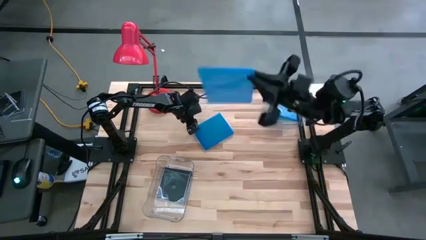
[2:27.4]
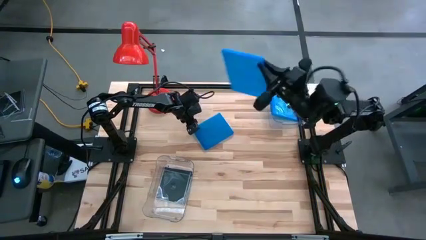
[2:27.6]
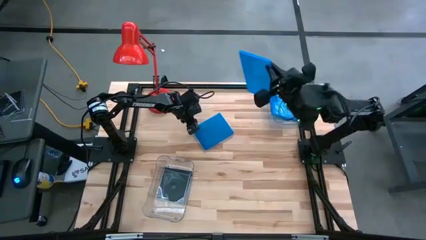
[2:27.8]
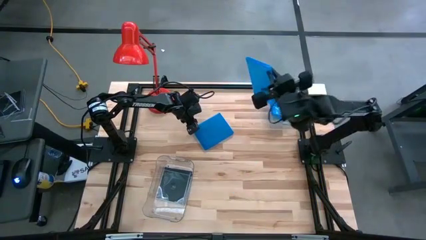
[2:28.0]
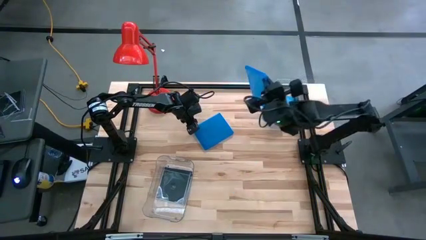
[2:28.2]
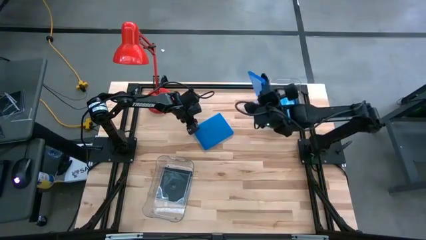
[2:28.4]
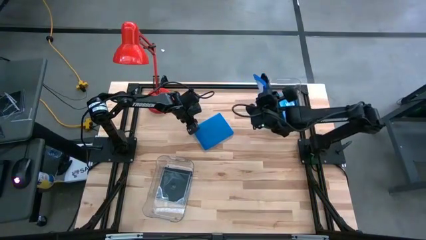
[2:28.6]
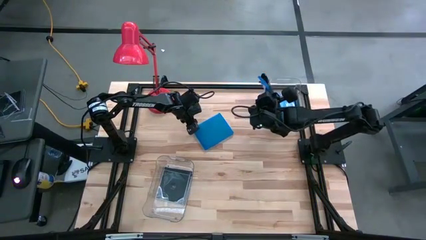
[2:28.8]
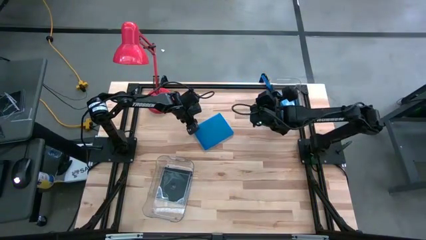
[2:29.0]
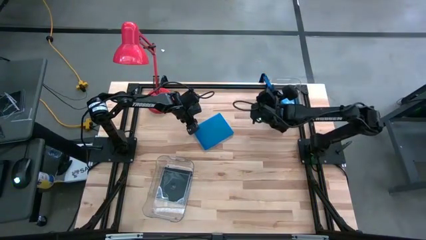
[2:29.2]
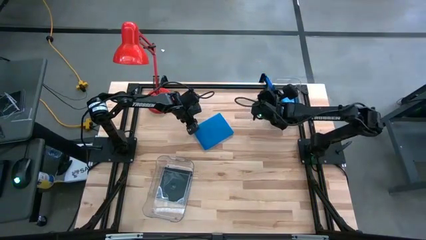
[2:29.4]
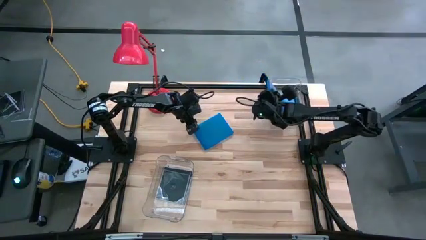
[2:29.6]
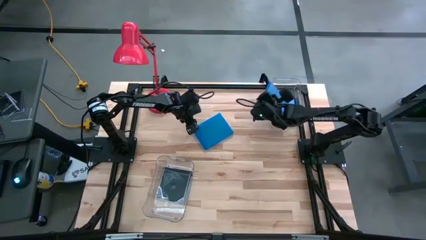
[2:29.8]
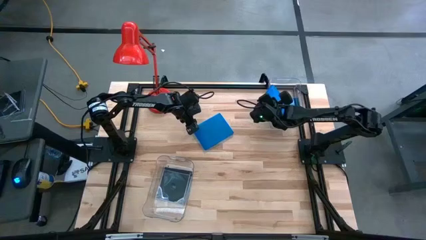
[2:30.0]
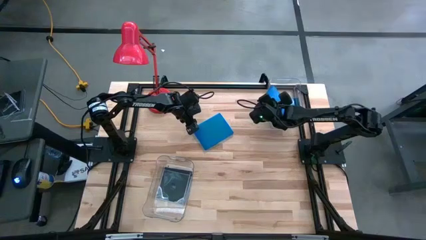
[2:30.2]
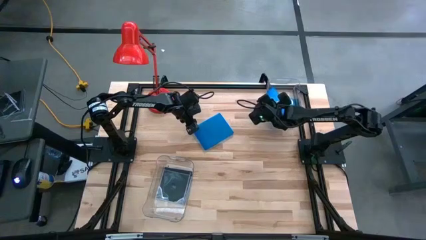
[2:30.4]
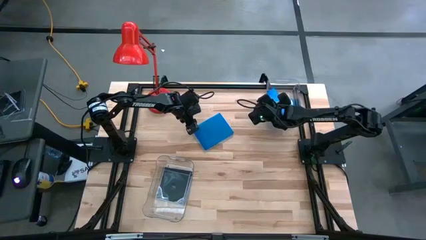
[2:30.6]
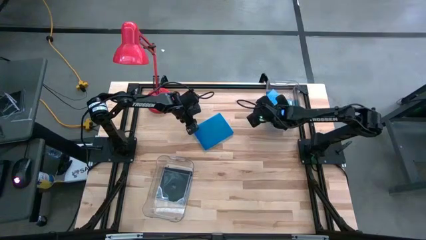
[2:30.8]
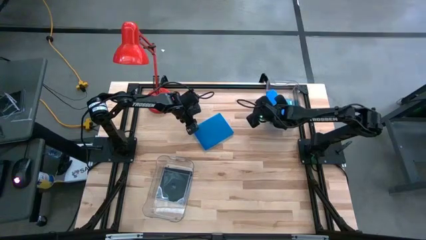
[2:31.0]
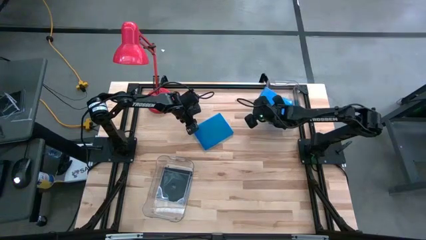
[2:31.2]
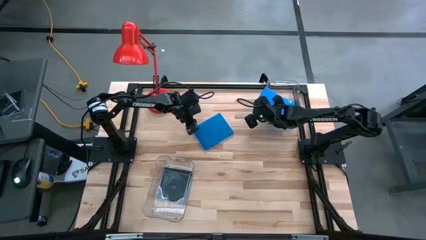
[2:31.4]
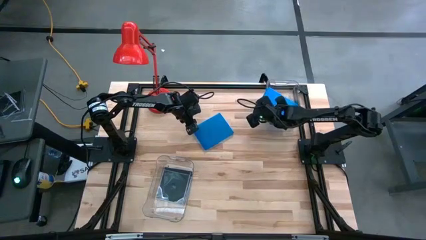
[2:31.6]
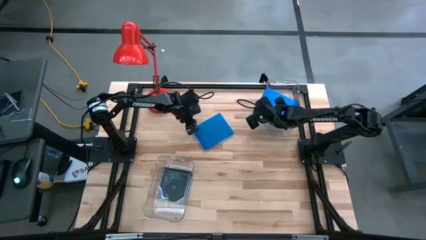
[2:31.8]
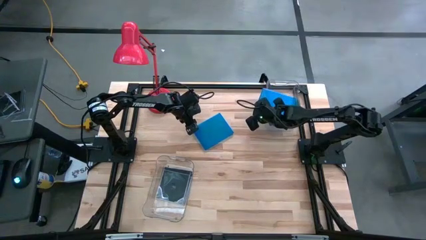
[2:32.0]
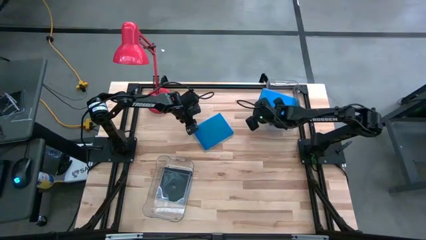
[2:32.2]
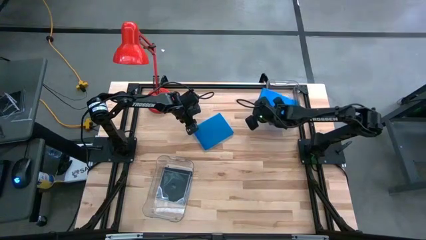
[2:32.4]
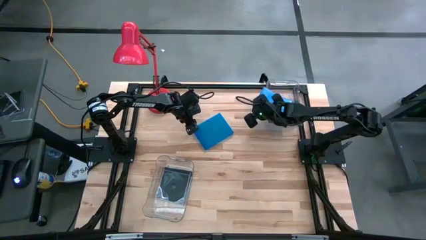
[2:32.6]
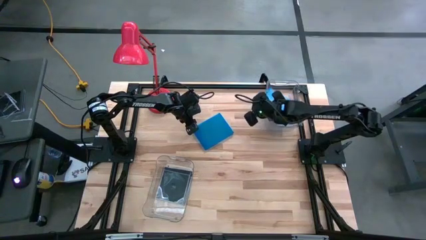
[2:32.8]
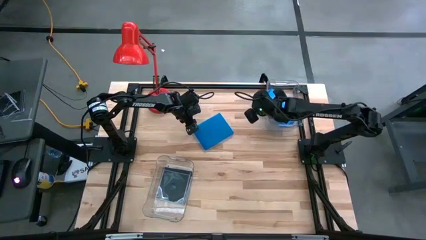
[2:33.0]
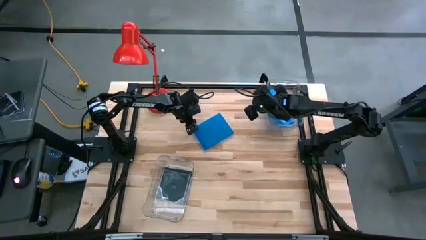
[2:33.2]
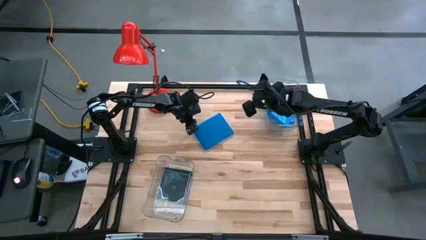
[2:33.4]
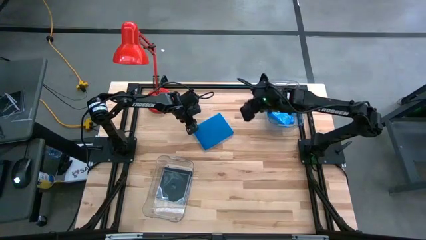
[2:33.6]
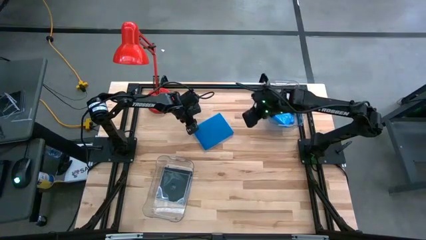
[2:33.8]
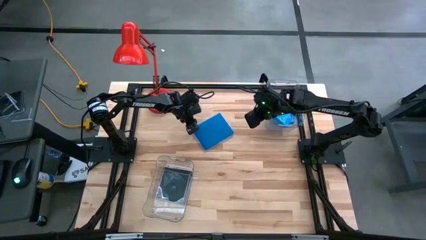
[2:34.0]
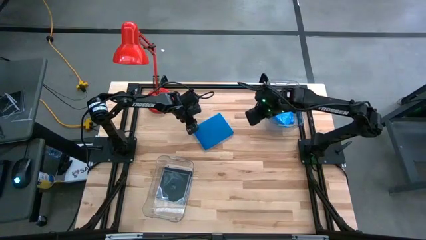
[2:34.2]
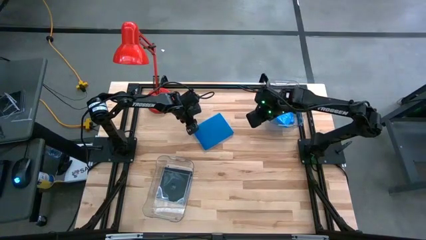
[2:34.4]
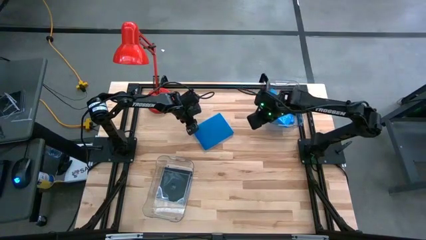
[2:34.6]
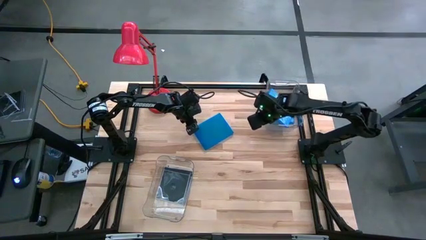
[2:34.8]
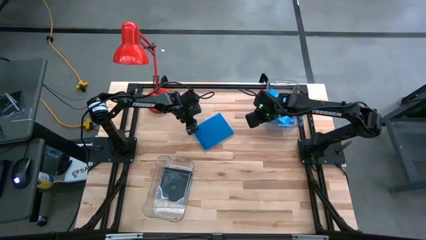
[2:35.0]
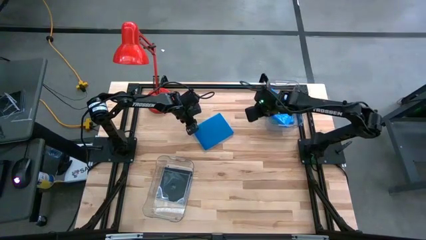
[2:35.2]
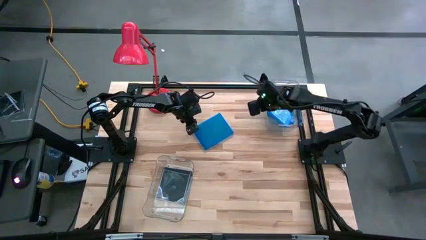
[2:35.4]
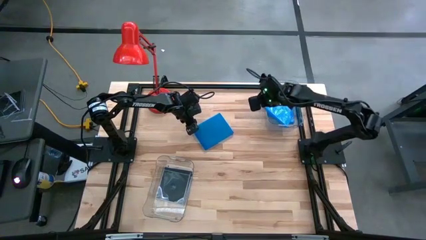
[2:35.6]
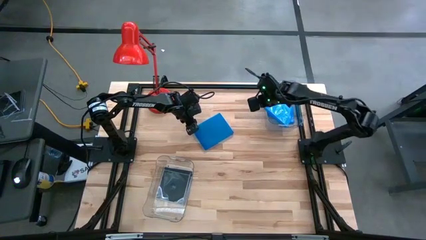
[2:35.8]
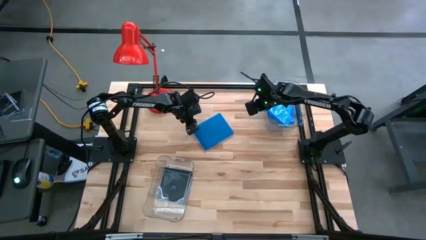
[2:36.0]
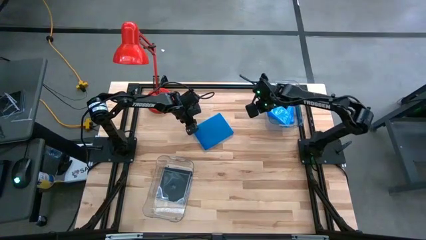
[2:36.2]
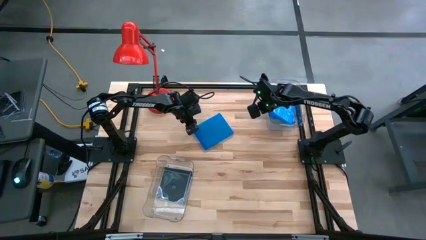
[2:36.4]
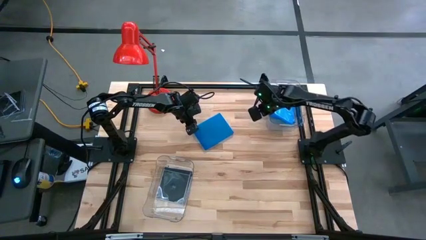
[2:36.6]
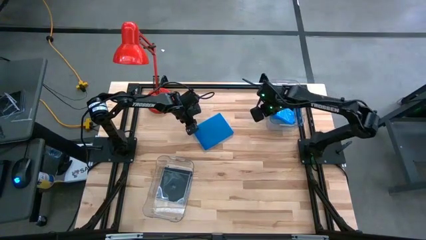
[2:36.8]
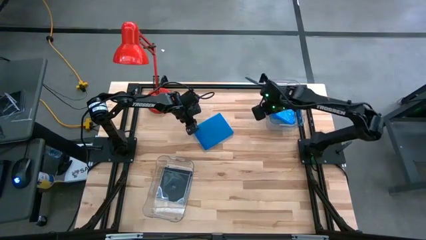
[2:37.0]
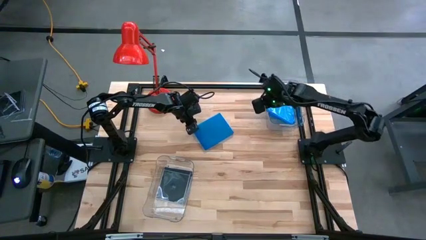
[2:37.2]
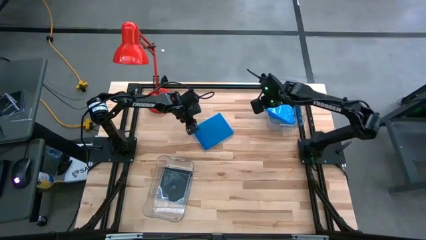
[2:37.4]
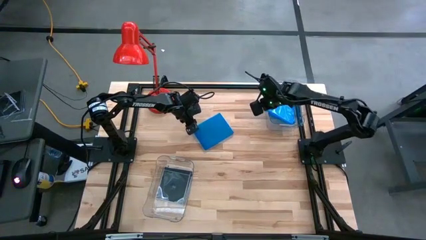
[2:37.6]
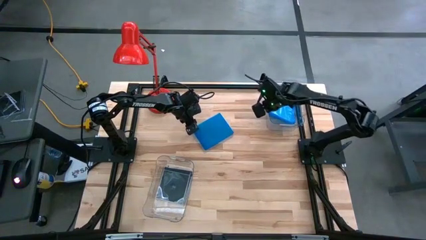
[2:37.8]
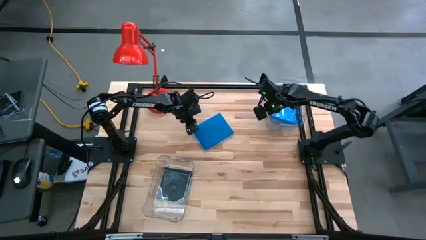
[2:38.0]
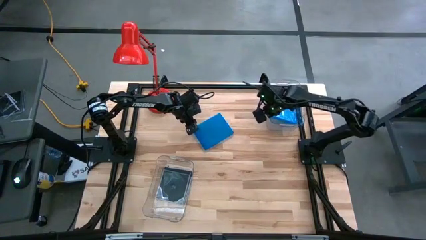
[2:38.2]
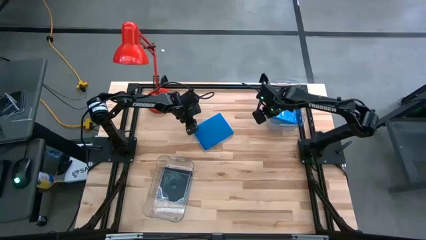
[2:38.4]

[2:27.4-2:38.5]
Task: Pick & place jewel cases by type
Put the blue cd case into the top transparent bin

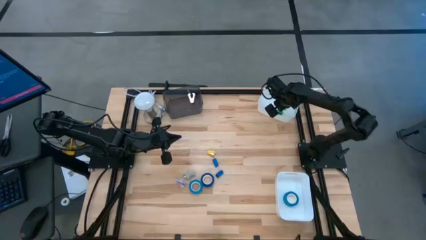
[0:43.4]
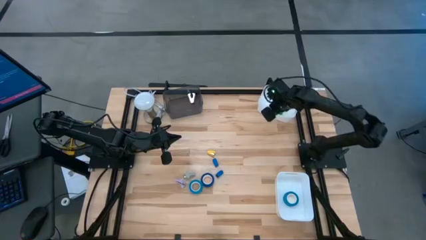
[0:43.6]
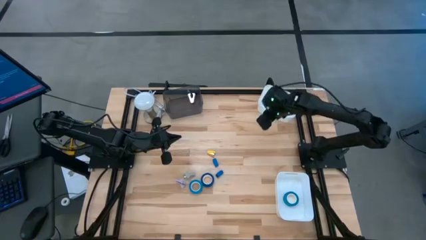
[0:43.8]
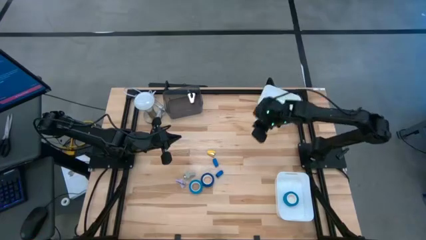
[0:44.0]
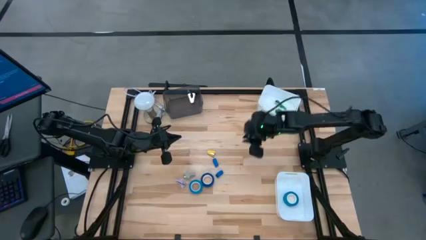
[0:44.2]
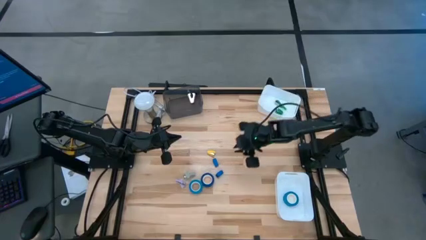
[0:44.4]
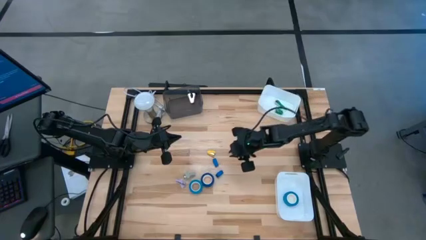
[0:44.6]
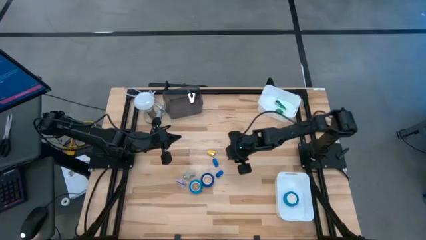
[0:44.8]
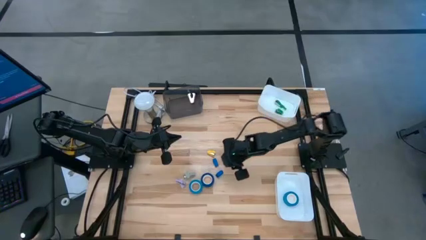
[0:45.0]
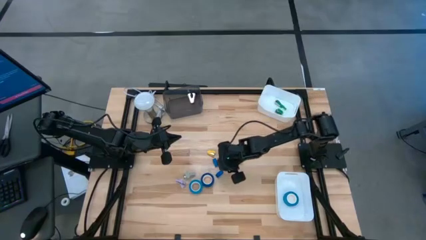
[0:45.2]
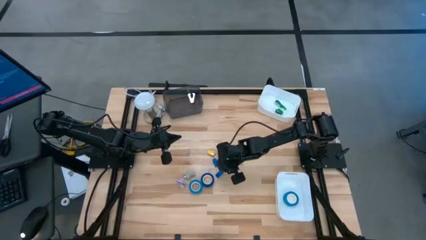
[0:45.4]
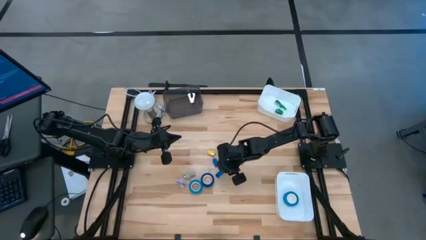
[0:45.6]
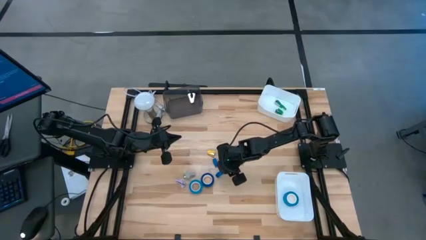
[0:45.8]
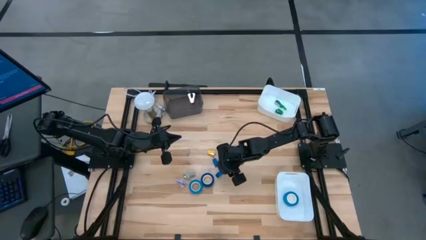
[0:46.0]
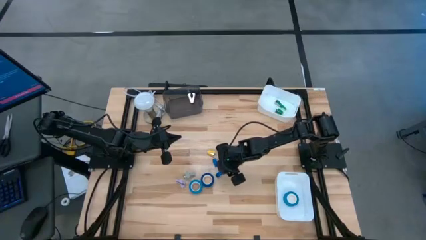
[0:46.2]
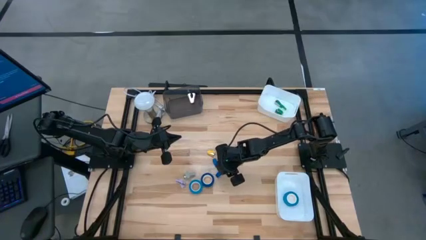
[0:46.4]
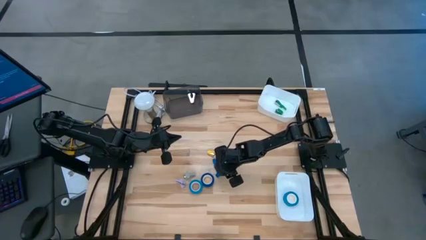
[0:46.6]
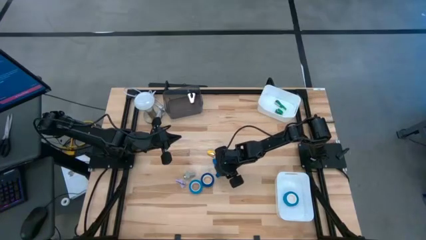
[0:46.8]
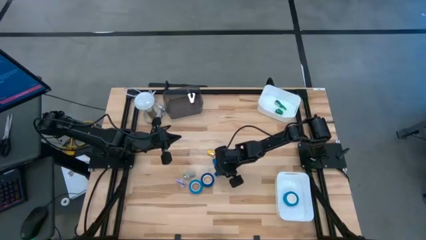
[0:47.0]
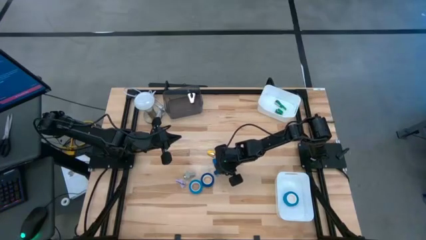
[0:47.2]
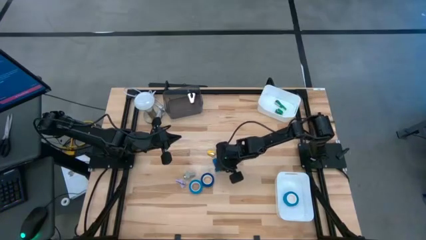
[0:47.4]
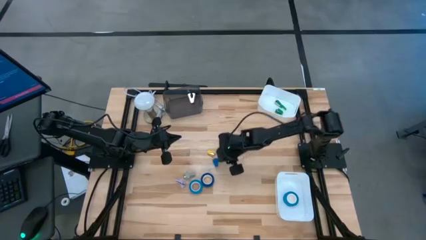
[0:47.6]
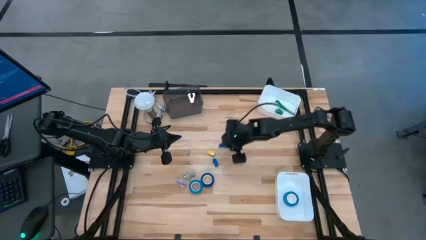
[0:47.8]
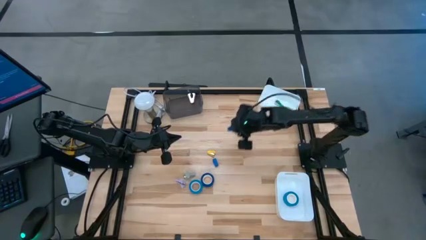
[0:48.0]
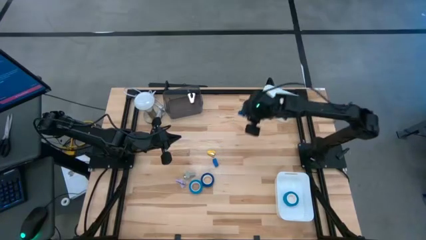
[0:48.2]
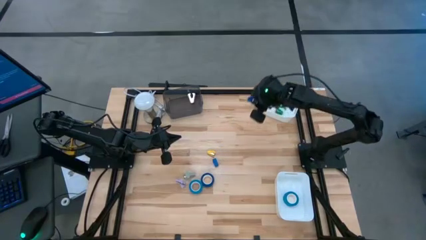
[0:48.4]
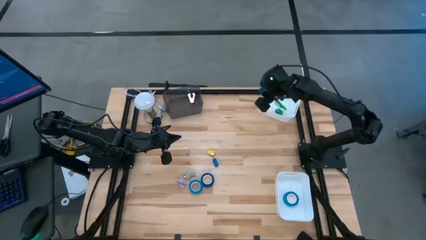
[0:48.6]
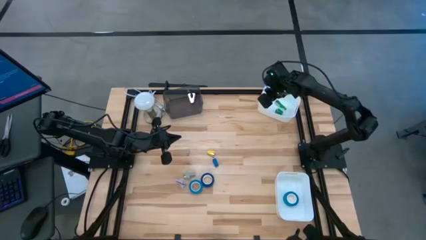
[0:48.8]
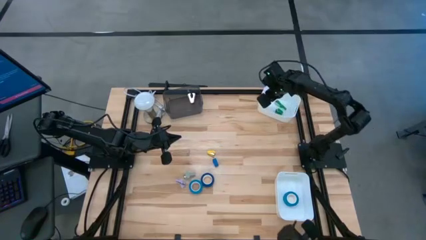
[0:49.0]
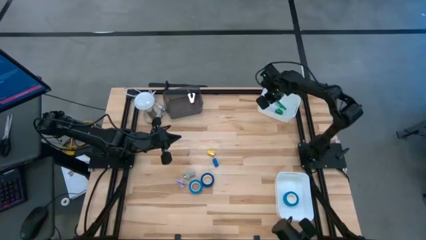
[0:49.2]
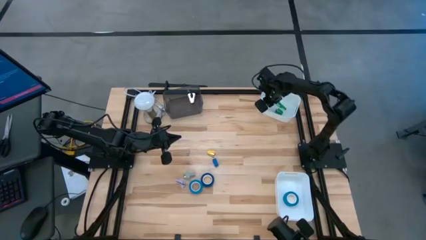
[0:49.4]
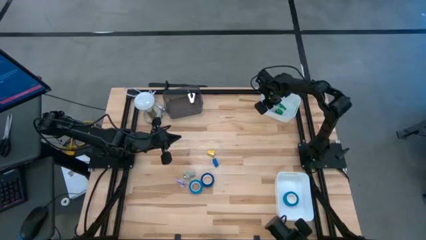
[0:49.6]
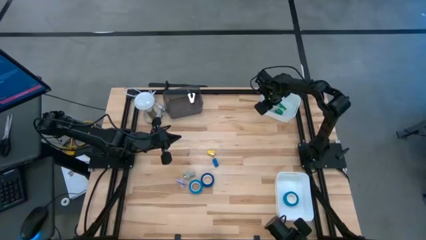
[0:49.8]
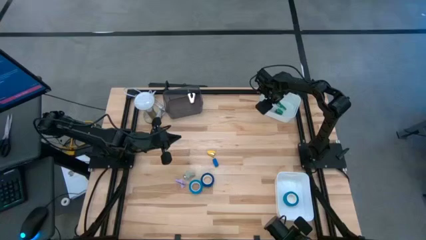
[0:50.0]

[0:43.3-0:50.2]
Task: Pick and place Stapler, Stapler remover, tape
Put the bottom blue stapler into the top white bin
